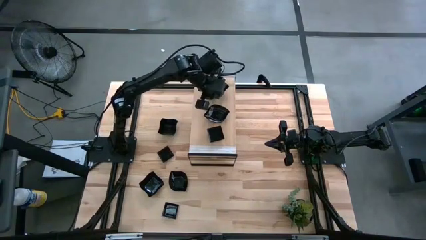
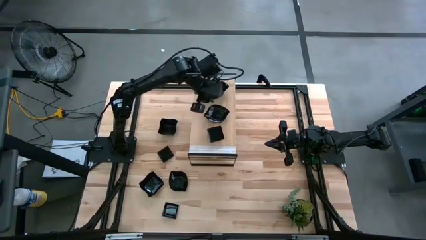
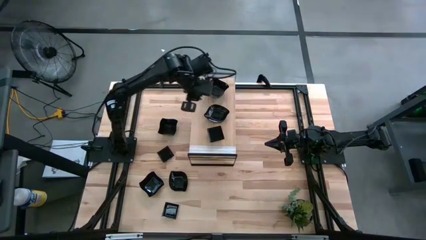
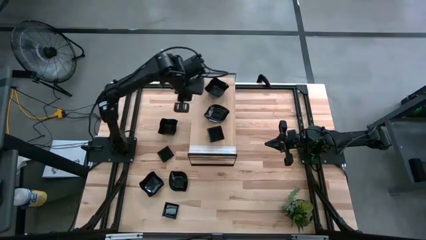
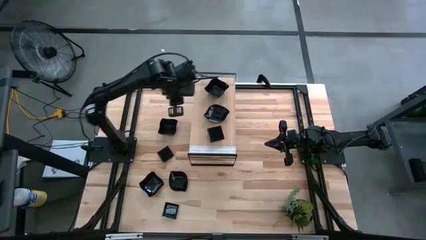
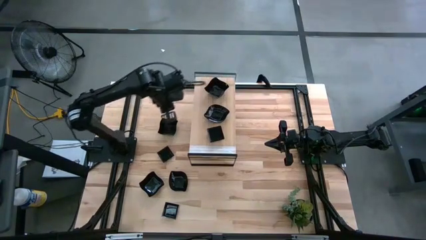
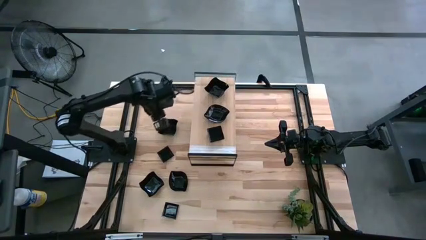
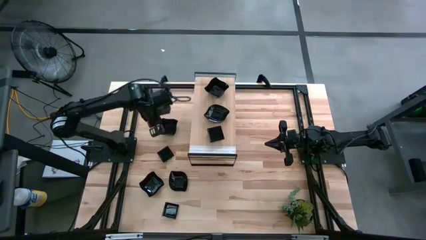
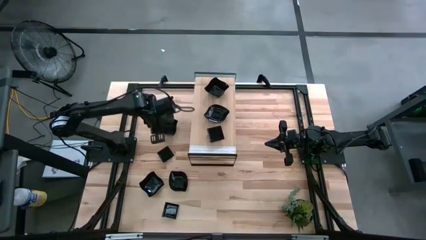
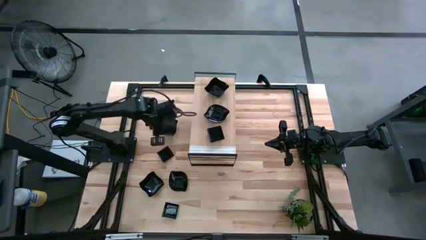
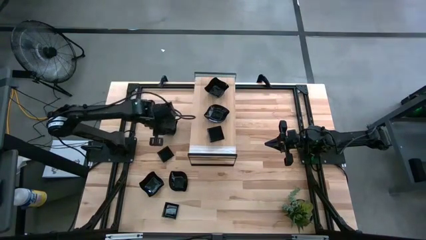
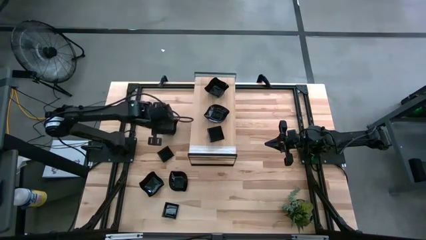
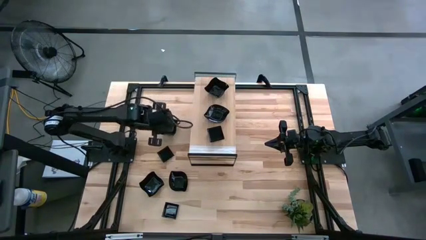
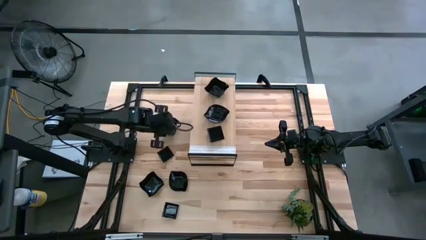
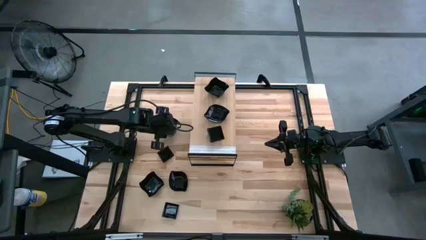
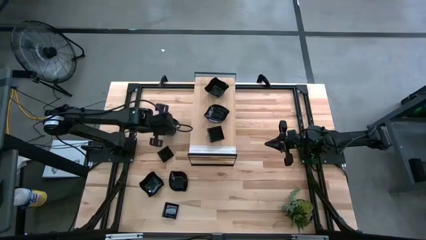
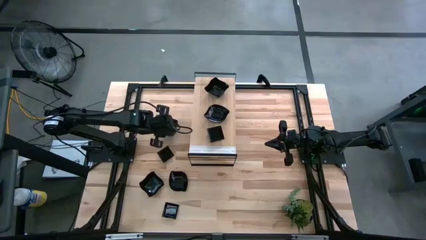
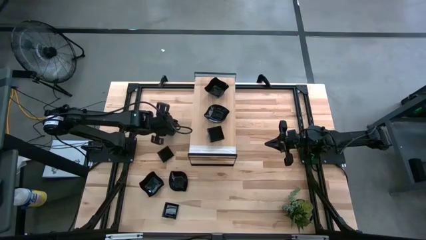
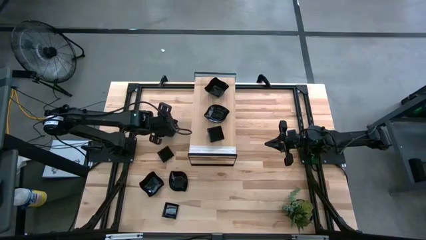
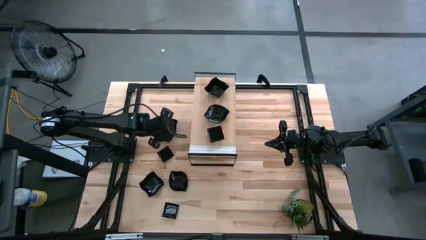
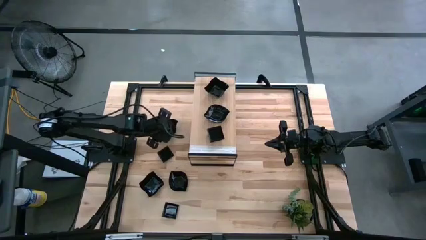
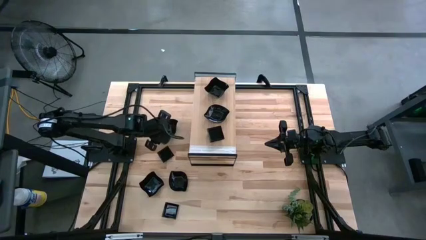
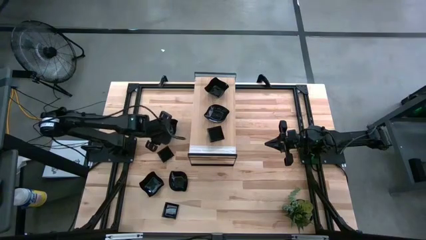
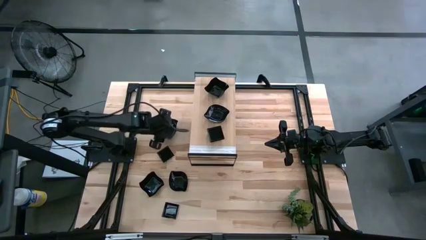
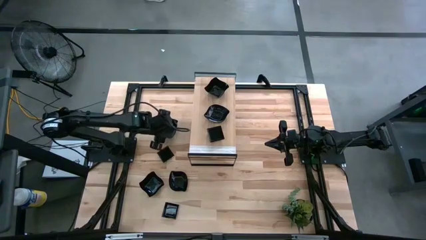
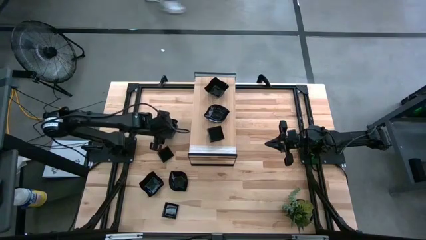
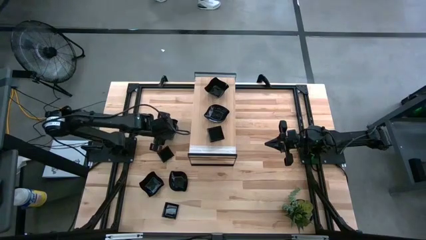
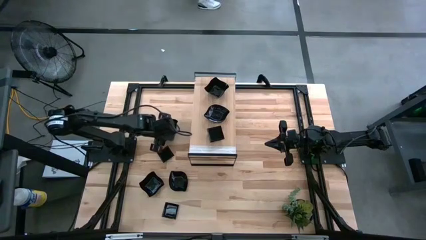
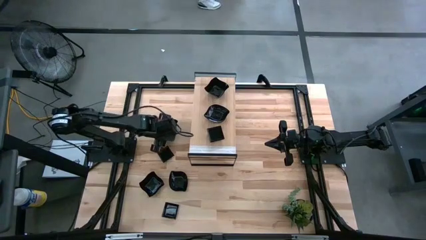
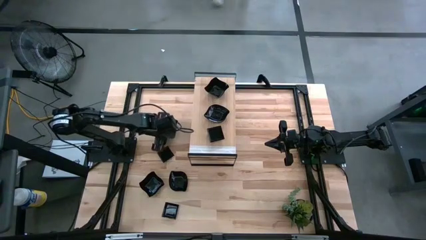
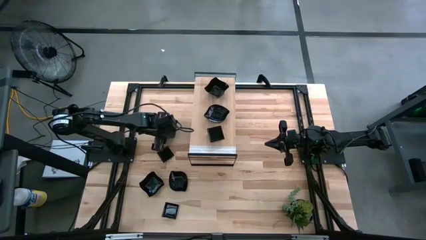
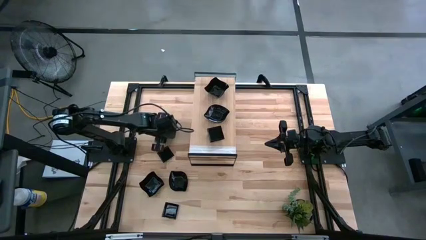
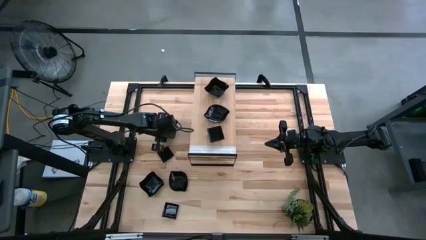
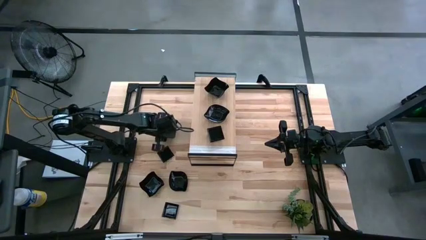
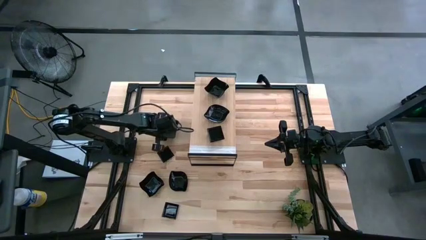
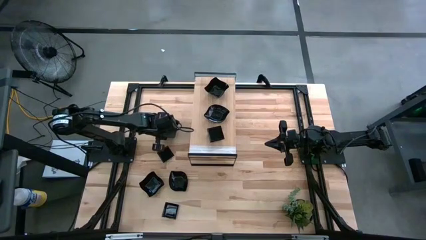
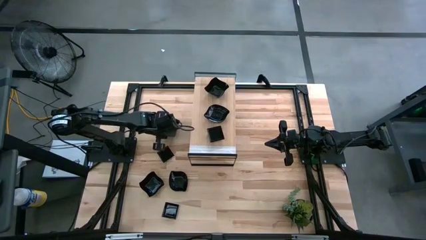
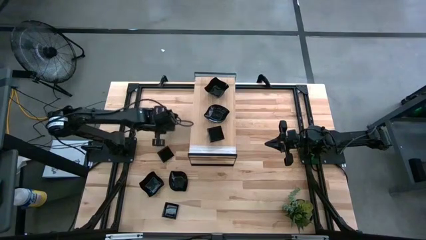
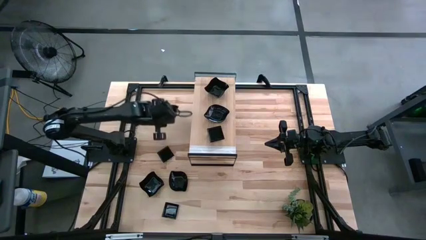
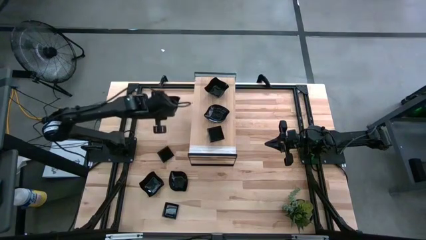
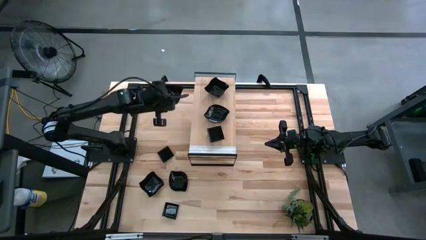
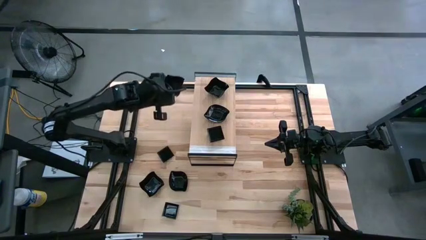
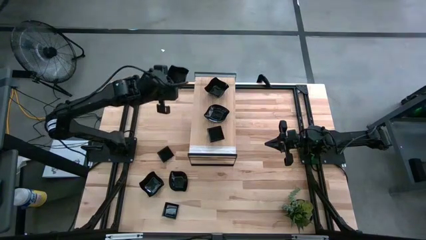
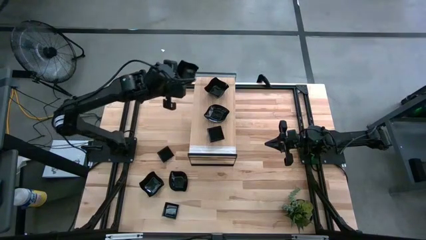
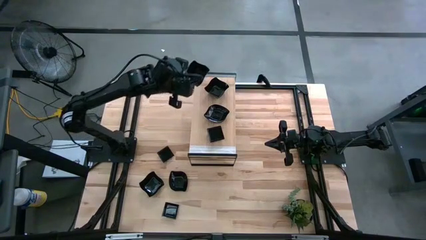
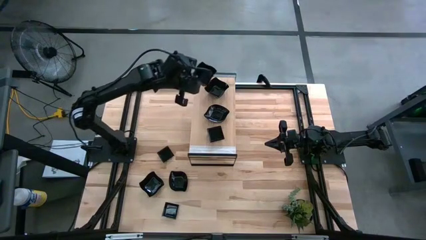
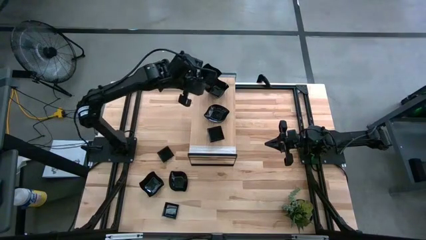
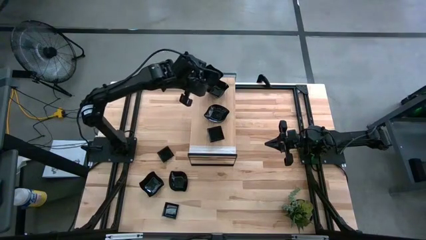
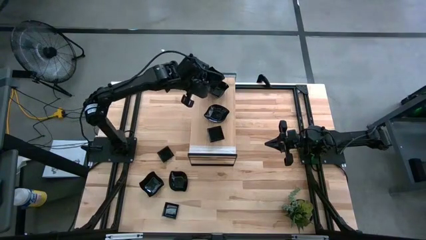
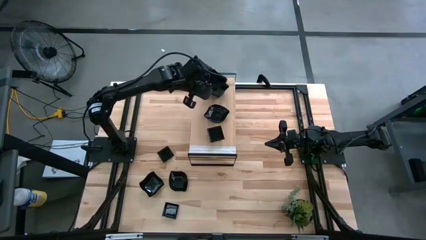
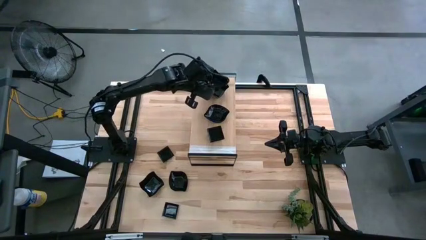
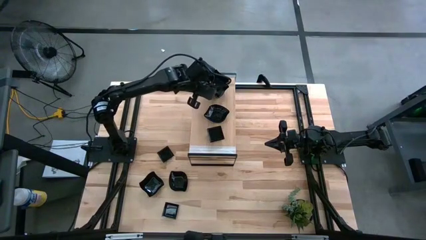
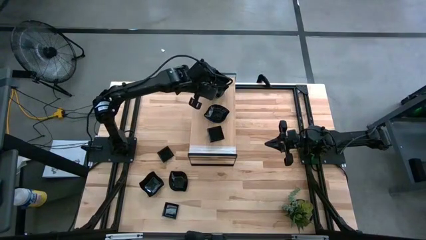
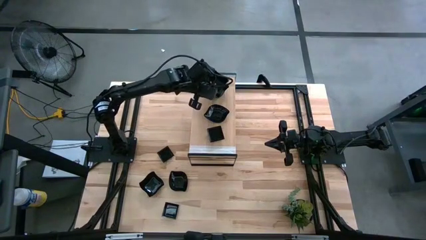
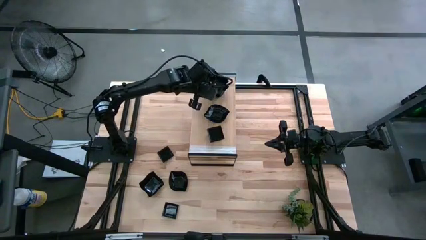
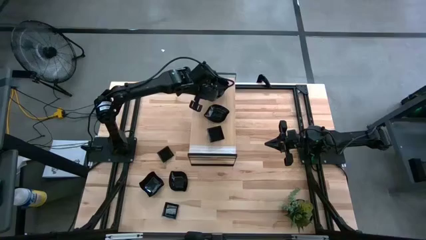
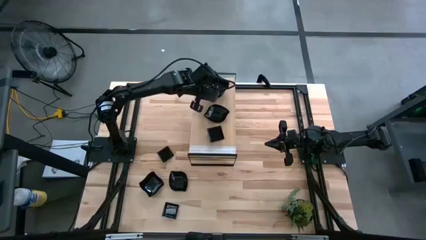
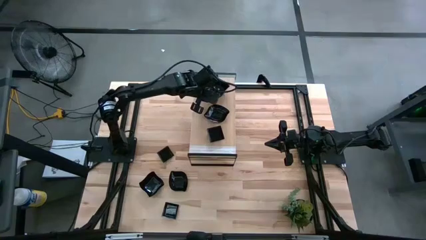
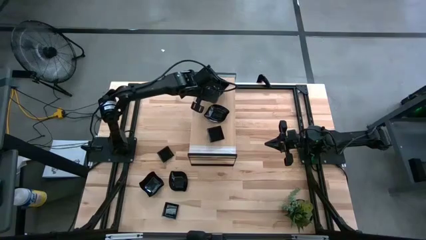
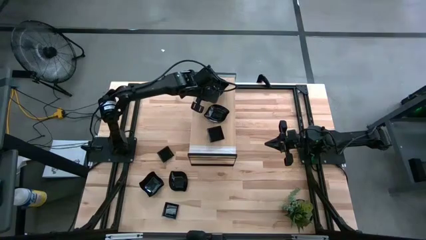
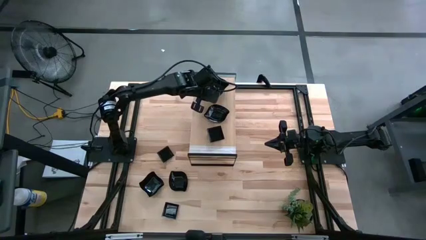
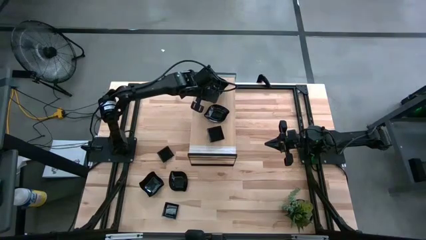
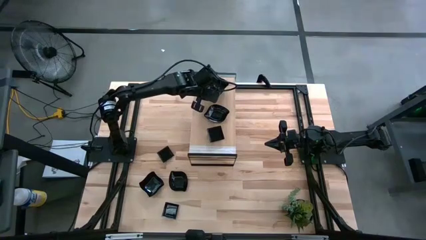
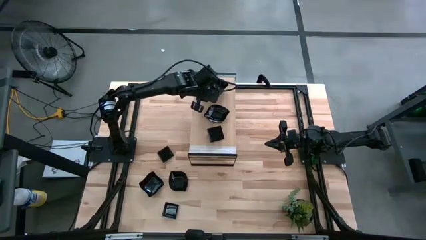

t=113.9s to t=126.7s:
Task: Pick & Place Mini shaped plates
Stack the distorted square plate on top of the stacked distorted square plates on the shelf

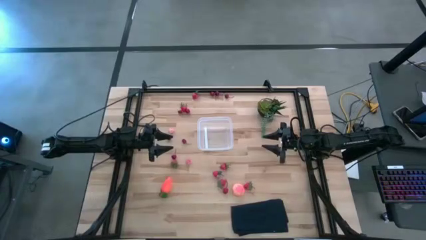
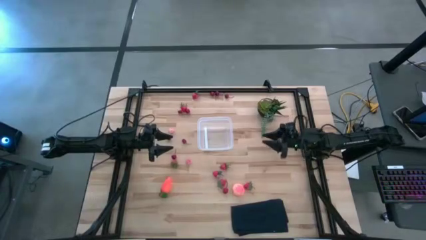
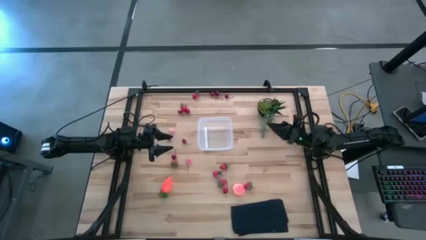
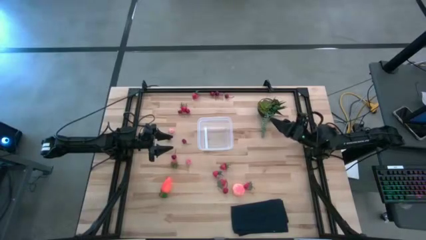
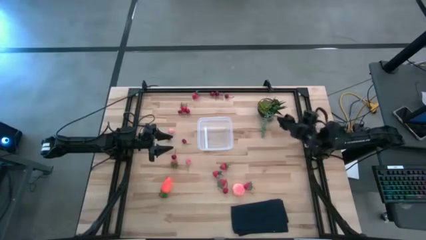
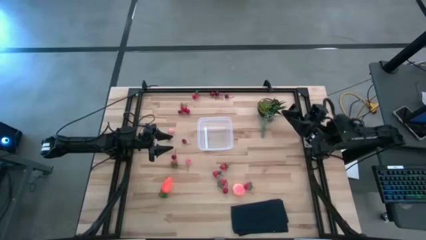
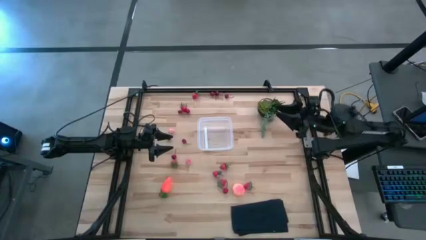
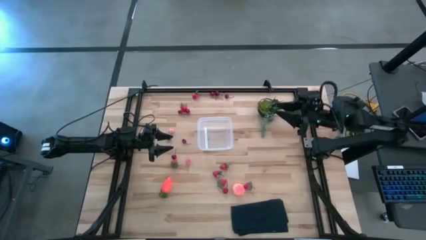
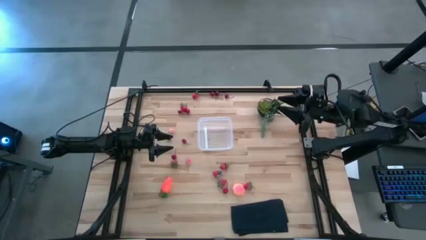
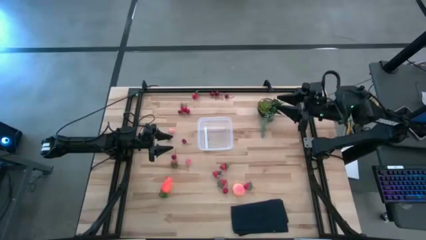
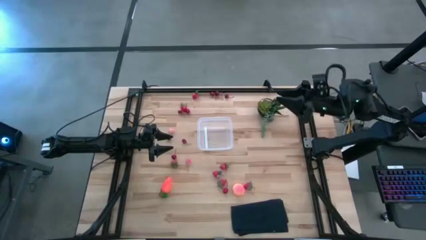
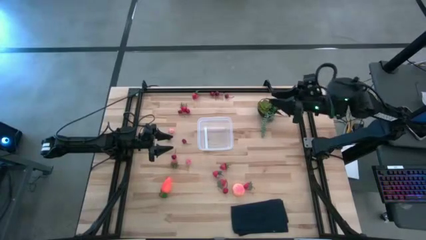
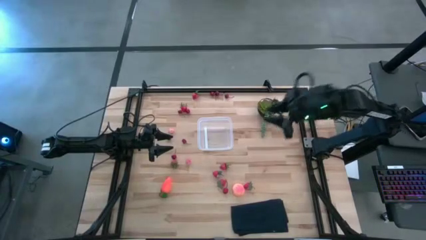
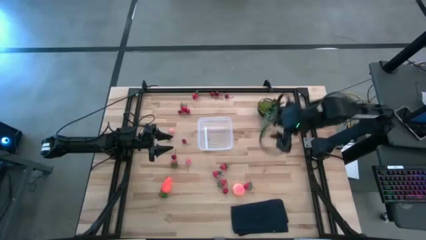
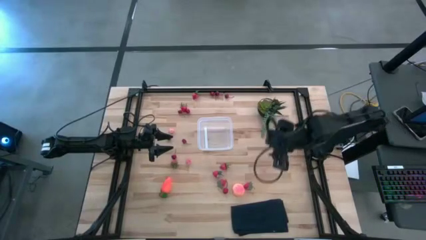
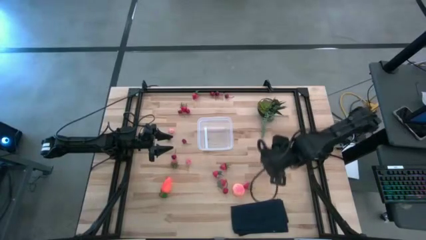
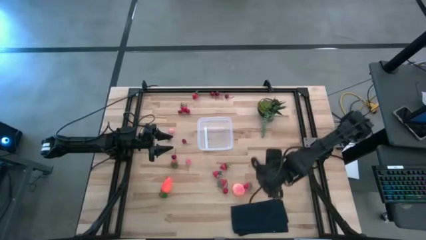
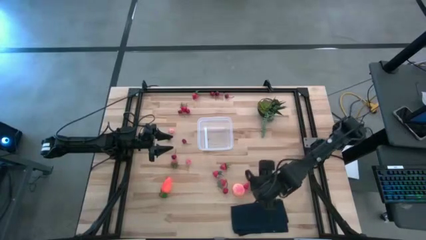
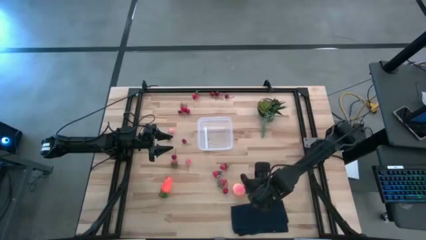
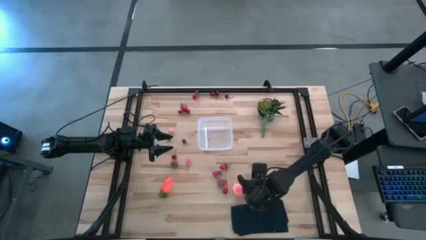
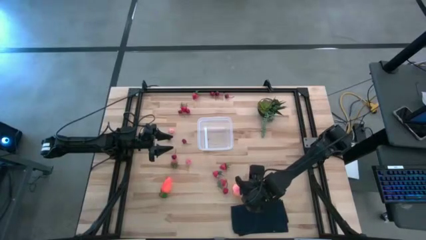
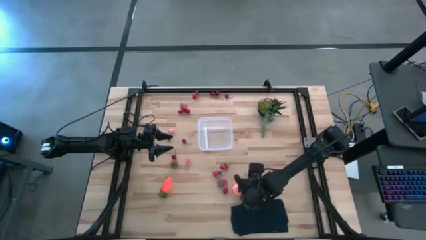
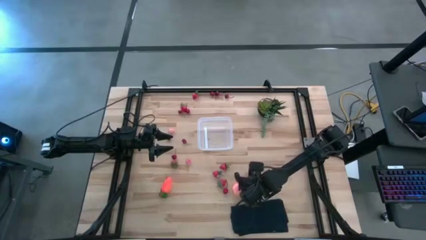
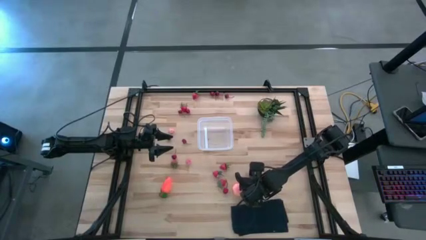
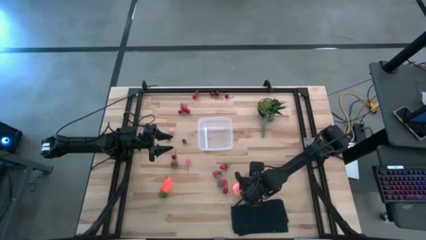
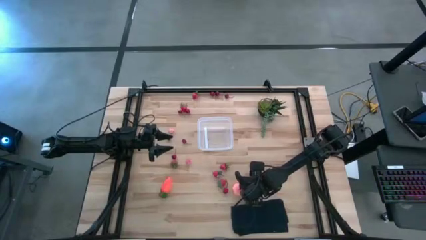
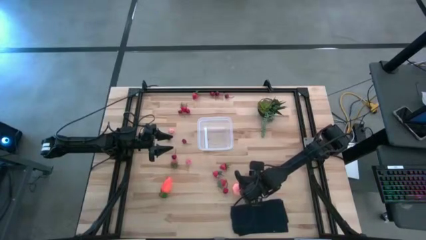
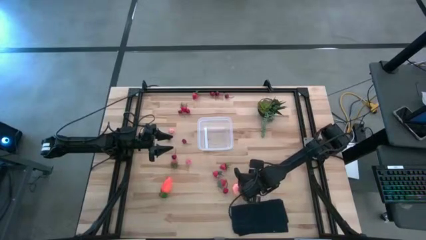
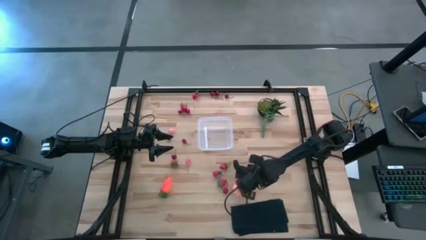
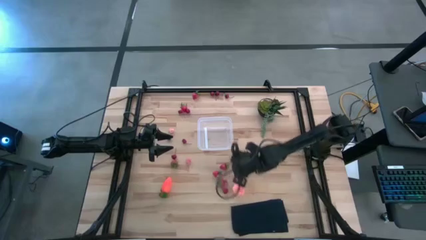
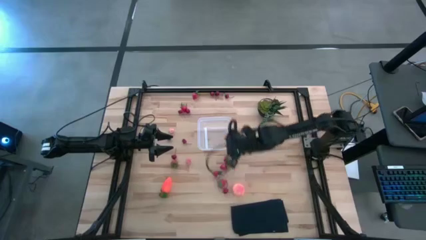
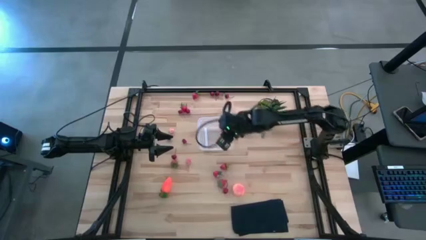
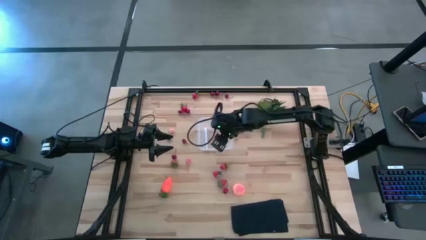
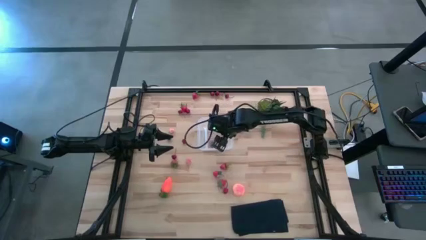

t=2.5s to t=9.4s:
Task: Pick and placing Produce into tupperware
Put the strawberry into the transparent bin
